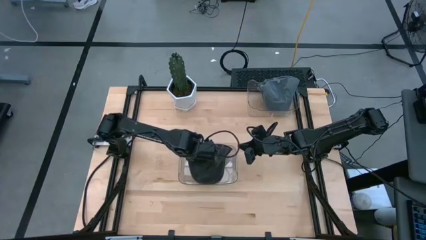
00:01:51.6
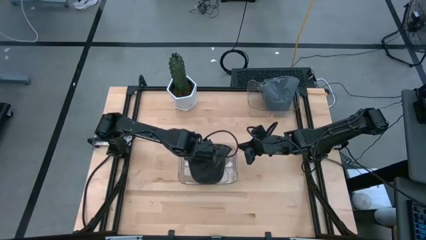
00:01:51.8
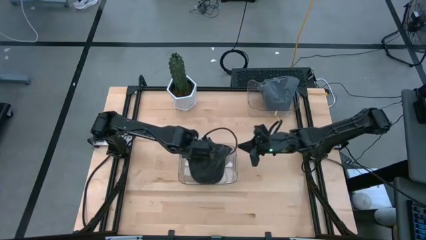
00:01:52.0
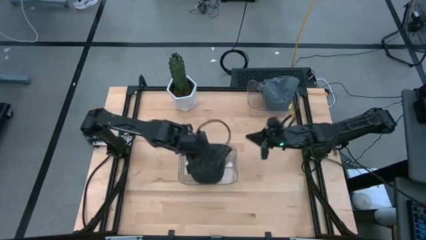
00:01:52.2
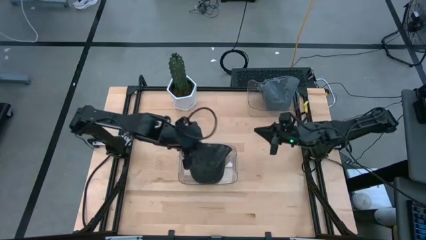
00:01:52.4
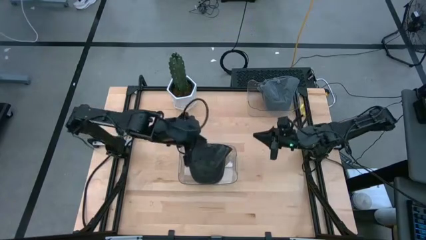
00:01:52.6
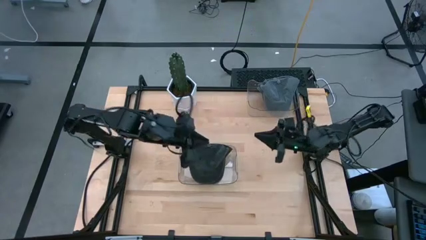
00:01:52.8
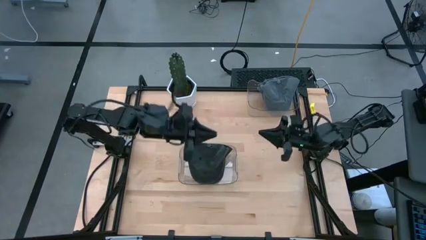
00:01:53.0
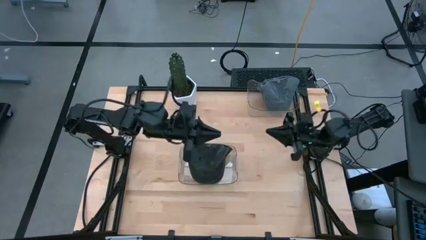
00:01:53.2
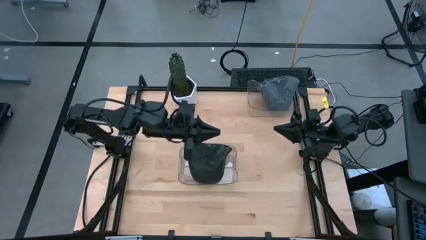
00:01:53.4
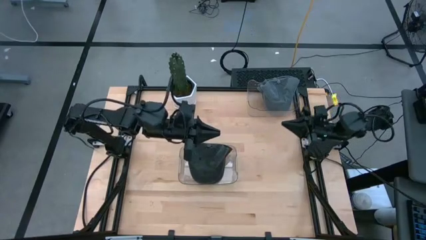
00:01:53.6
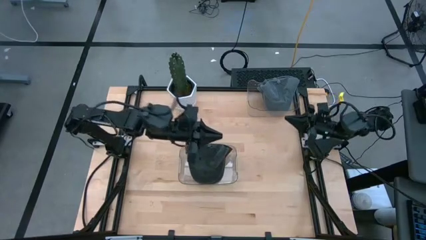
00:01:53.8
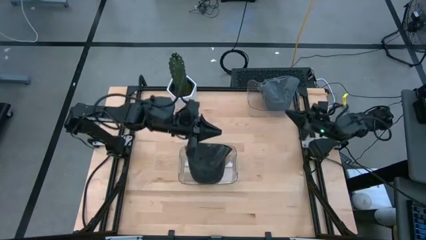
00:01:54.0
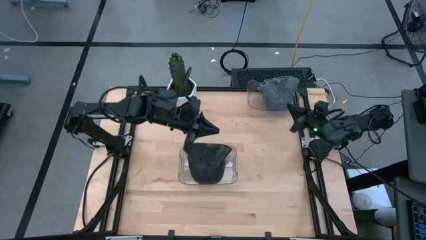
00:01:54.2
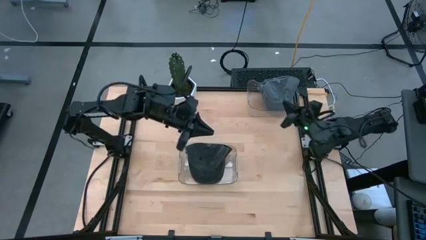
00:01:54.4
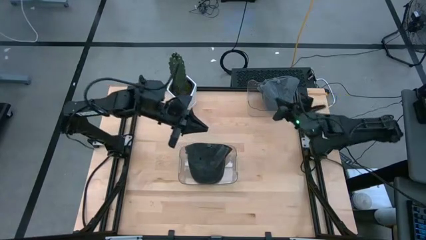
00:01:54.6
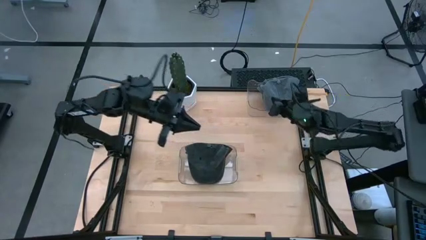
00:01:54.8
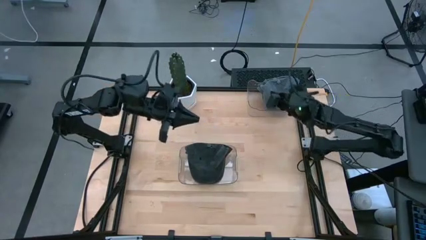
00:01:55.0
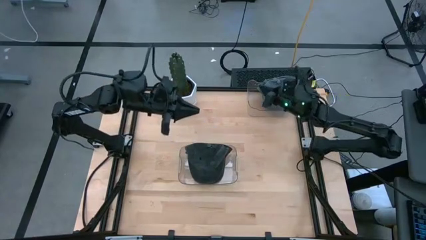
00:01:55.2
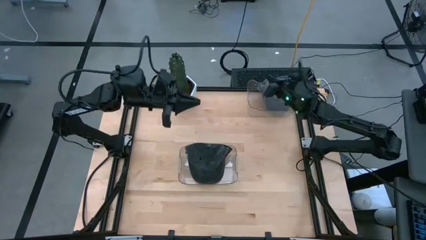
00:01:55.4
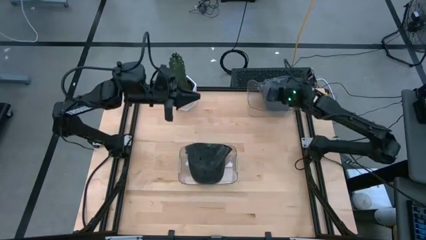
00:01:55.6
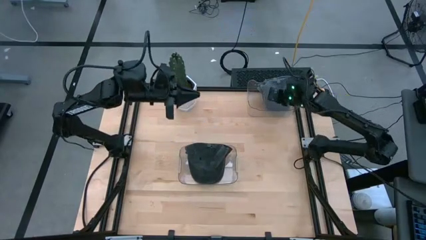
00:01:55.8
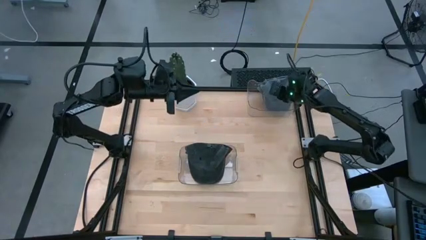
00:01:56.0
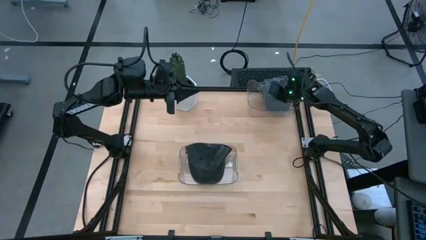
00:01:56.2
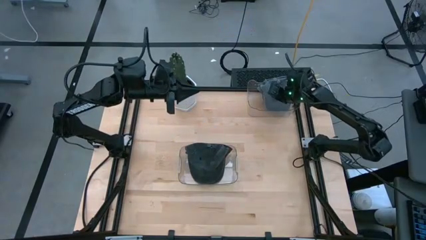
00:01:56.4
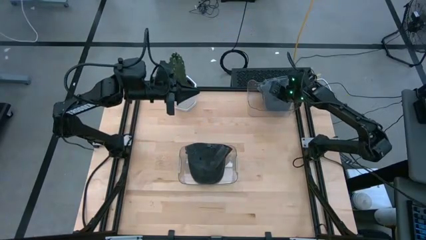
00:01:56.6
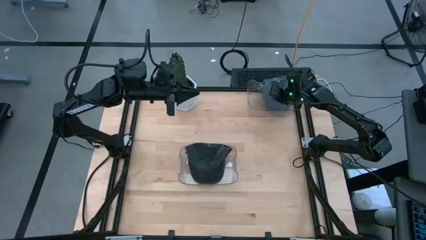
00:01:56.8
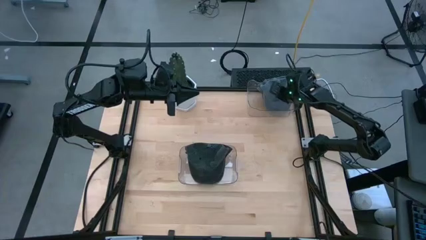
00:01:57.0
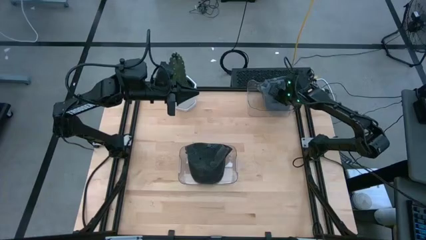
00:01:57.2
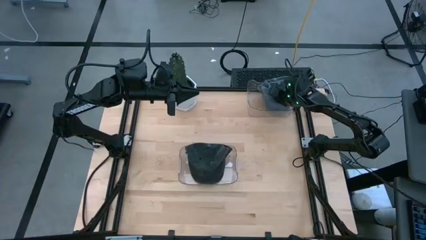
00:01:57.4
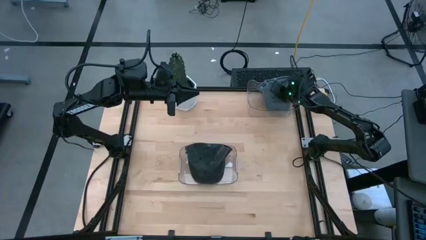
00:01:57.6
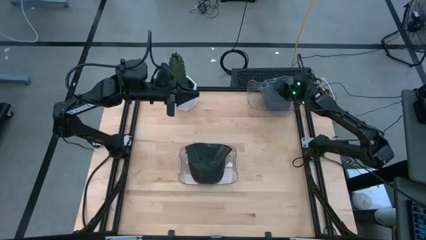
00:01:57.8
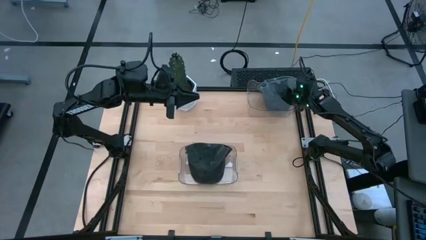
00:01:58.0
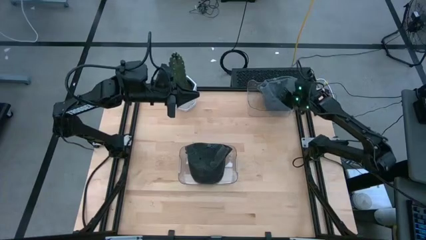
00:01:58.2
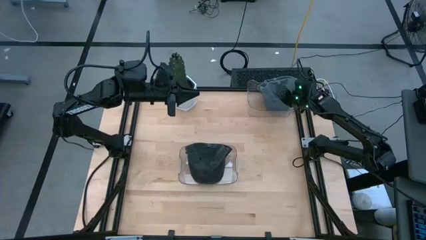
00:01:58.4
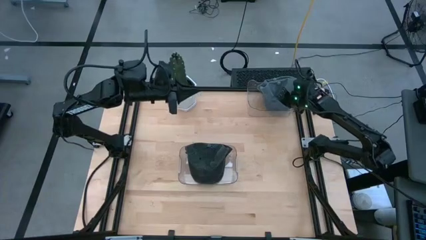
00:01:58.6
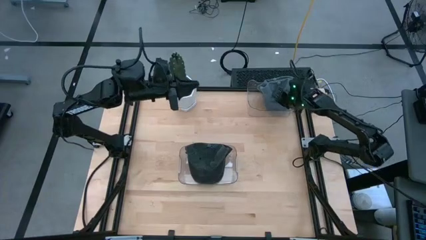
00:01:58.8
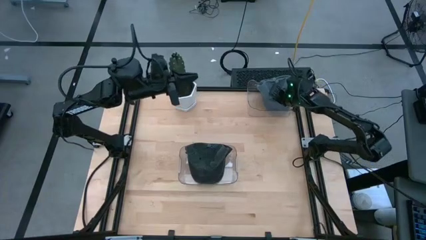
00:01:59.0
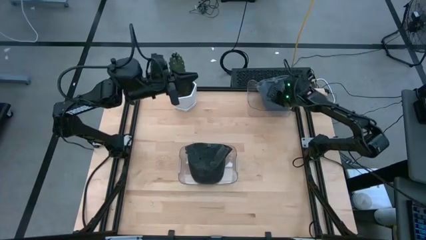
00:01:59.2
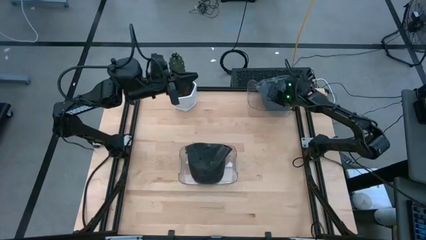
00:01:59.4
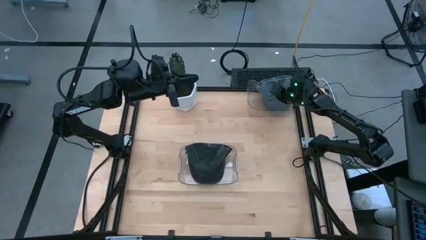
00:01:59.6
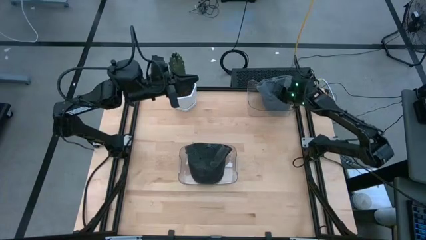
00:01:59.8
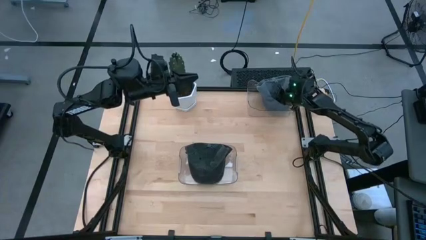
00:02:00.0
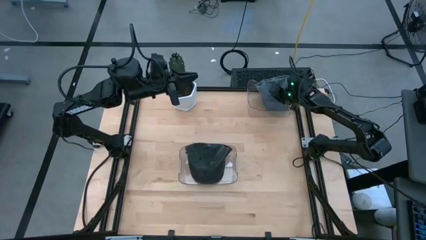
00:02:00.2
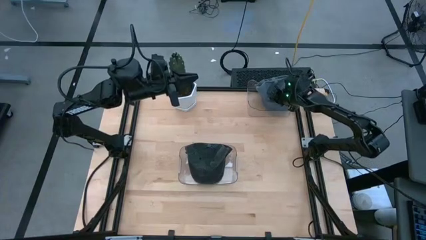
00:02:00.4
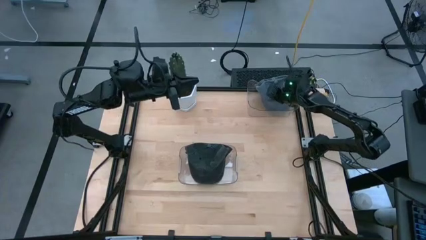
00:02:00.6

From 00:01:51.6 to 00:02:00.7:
Task: Pick & Place hat
Adjust the gray cap in the top transparent bin

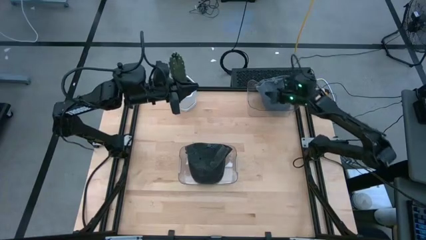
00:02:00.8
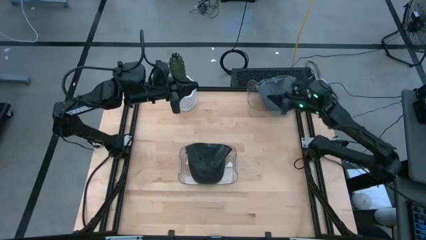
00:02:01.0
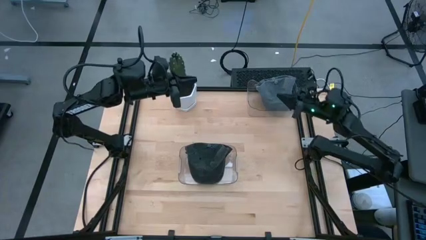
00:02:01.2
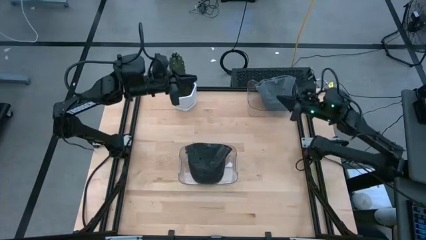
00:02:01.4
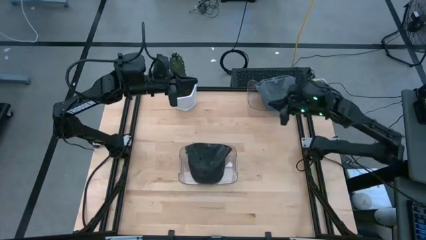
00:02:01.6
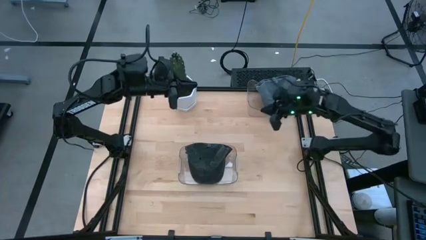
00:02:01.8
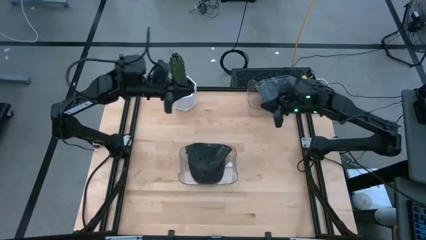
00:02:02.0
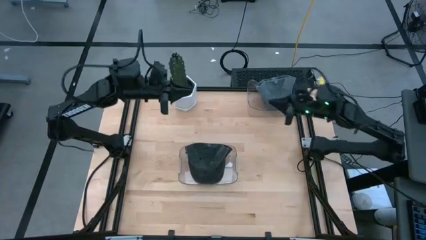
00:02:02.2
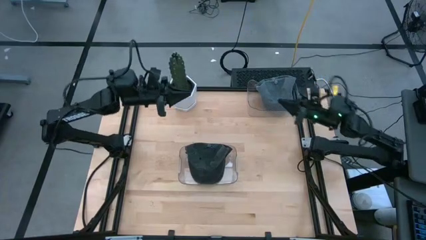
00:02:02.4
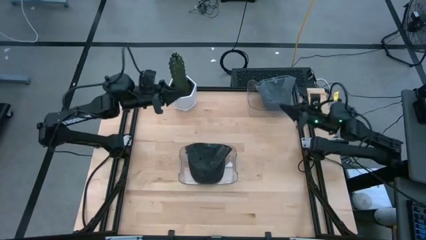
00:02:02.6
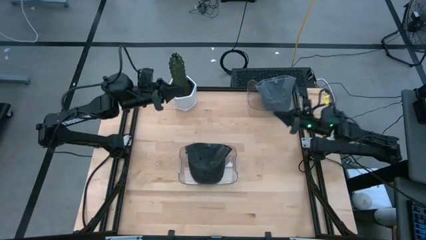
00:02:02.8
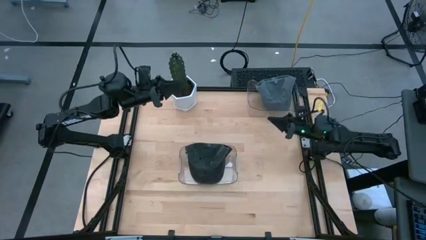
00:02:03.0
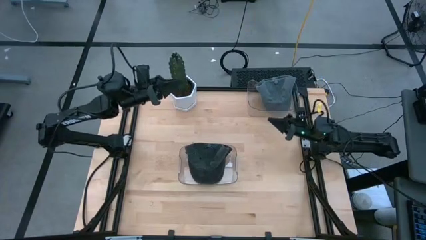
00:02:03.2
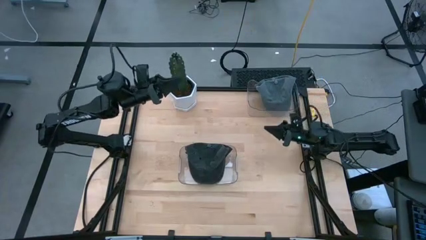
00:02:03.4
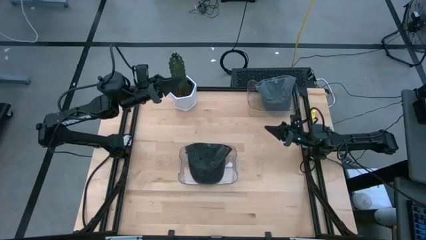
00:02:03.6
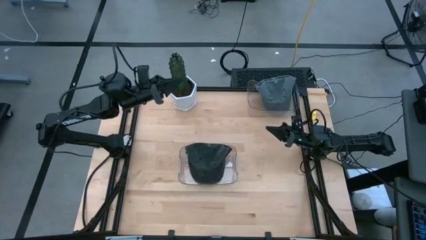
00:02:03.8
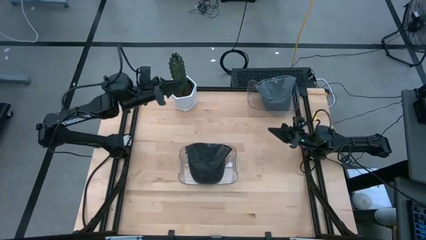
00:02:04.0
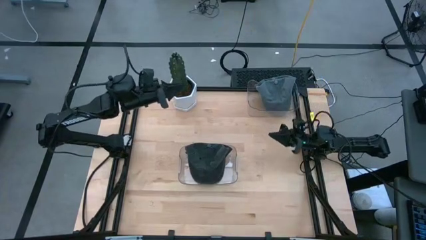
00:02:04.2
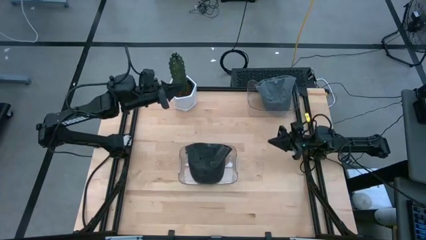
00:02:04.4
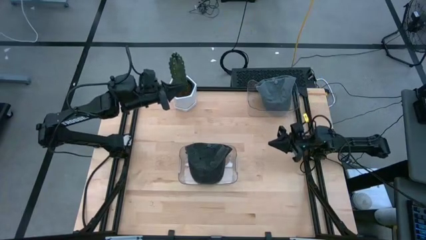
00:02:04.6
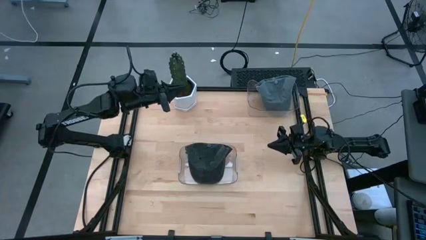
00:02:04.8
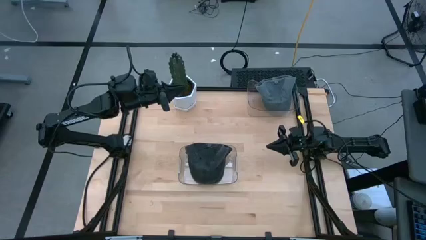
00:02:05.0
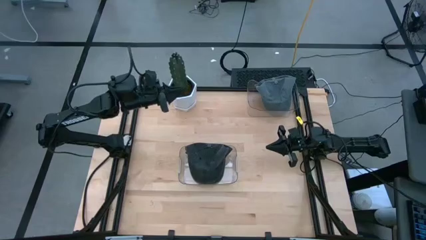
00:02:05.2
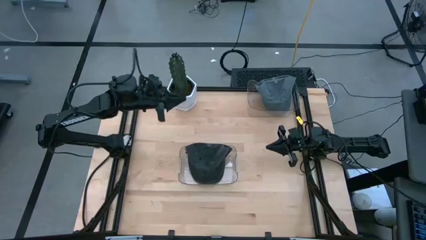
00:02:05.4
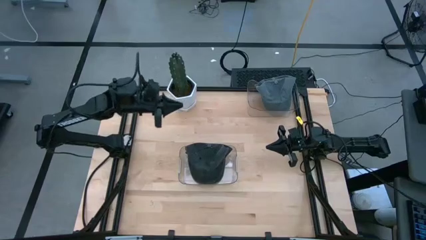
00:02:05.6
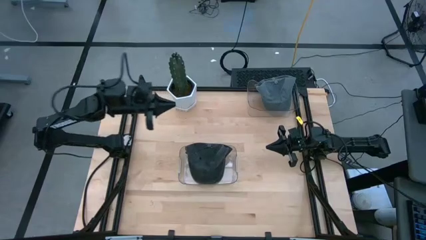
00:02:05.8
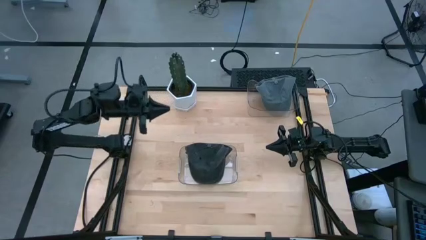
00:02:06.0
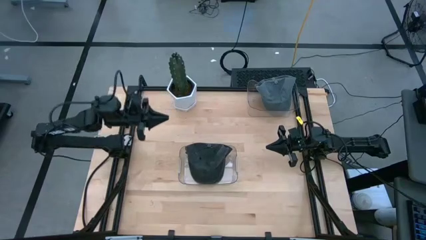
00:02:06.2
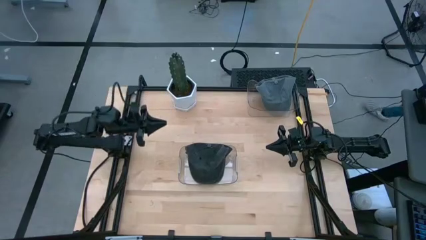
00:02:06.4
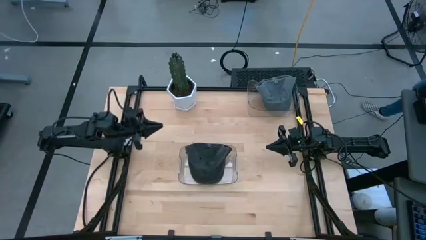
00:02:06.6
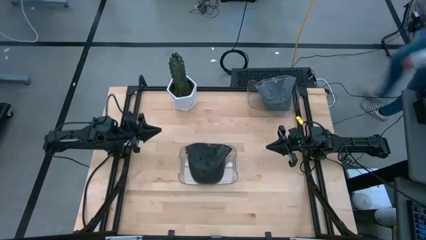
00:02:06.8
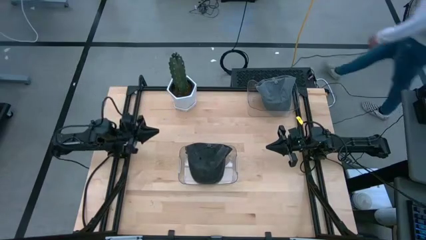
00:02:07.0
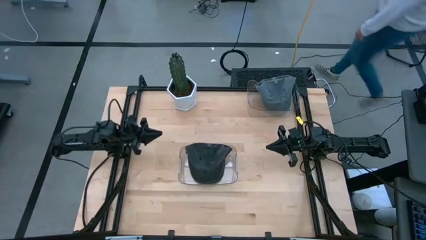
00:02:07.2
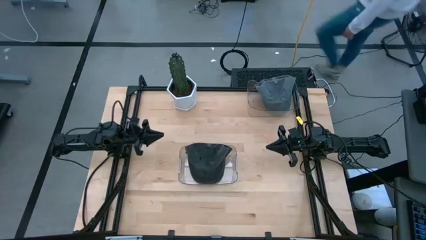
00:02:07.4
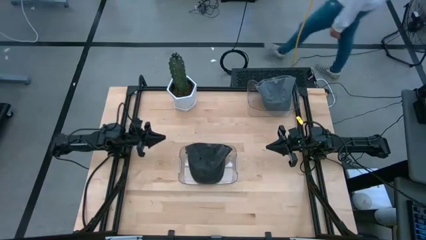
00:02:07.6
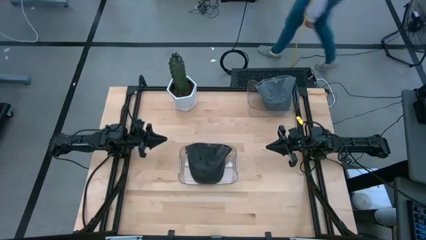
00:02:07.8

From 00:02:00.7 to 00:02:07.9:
Return to Home Position

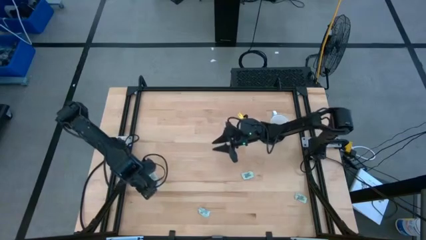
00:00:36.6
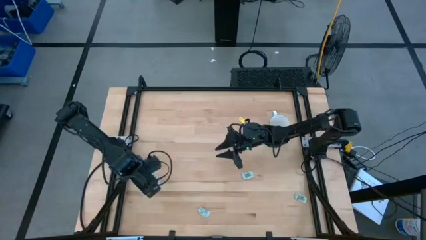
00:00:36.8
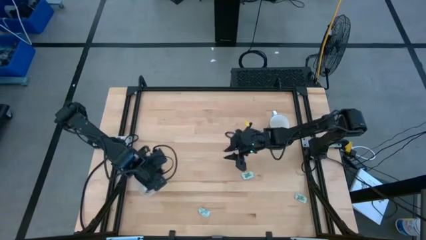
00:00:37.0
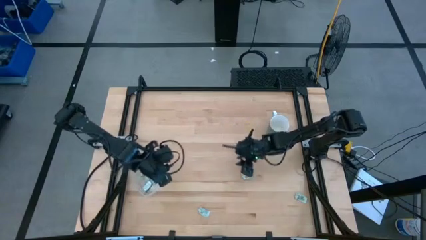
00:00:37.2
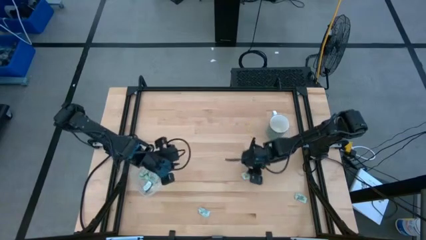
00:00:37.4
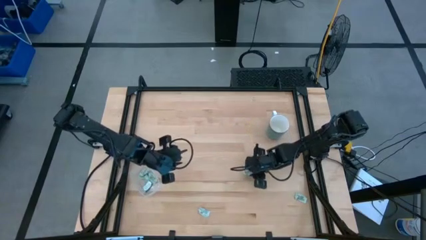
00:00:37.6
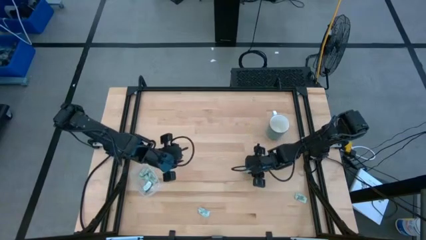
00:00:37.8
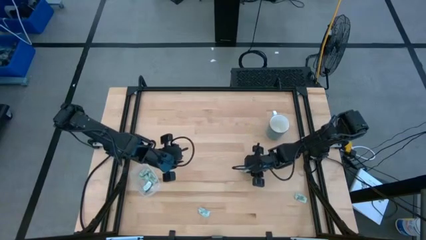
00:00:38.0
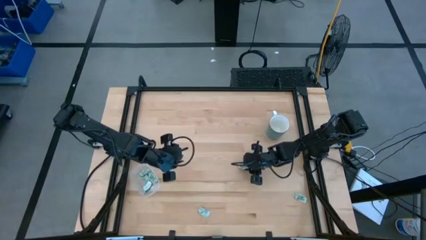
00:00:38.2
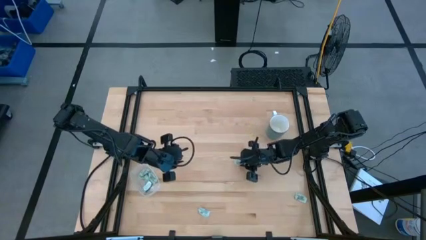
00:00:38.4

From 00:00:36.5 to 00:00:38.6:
Task: Pick and place Stevia / Truvia into bins
Put the stevia packet into the transparent container
